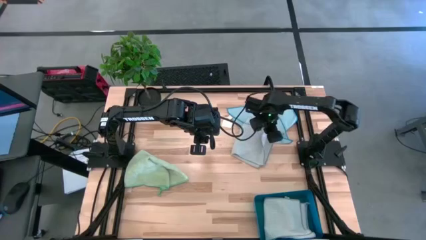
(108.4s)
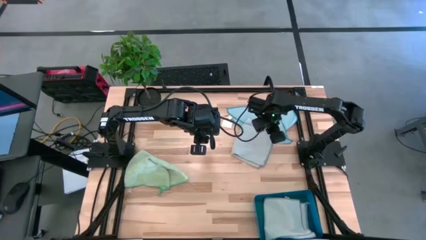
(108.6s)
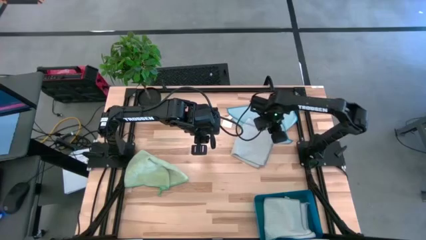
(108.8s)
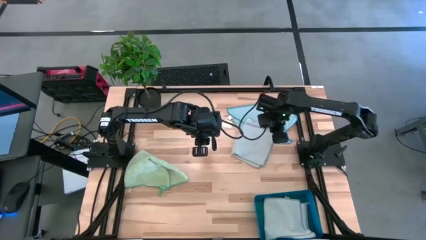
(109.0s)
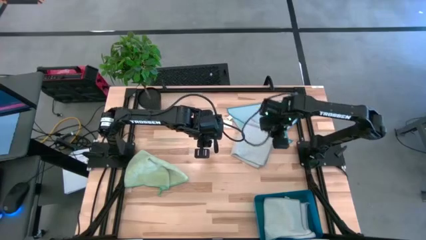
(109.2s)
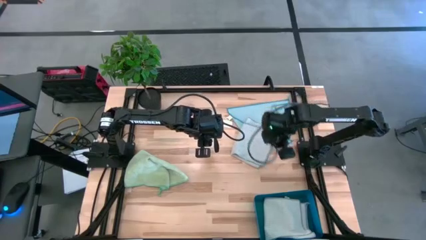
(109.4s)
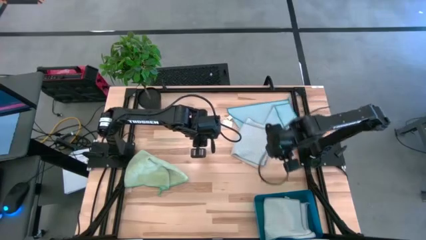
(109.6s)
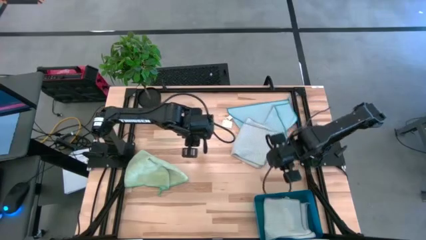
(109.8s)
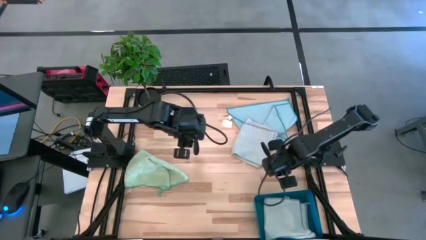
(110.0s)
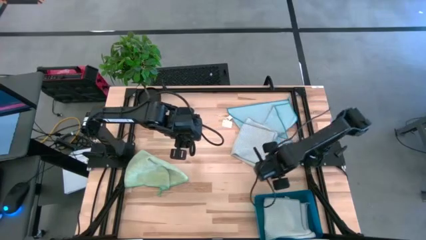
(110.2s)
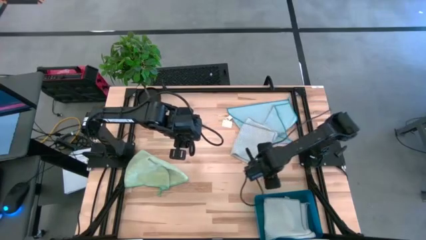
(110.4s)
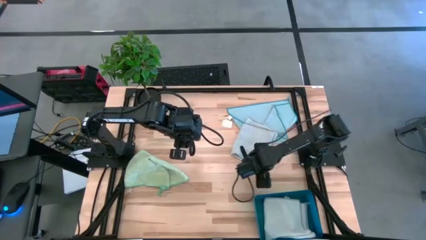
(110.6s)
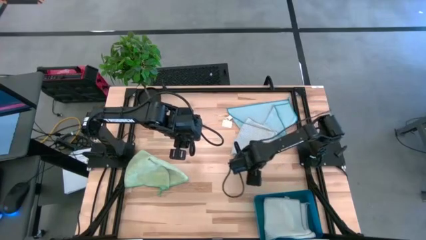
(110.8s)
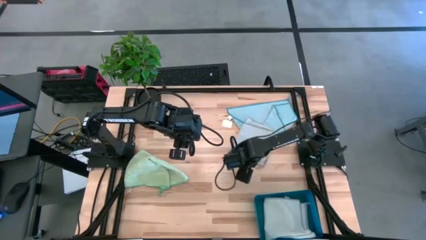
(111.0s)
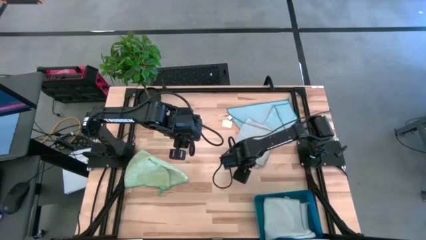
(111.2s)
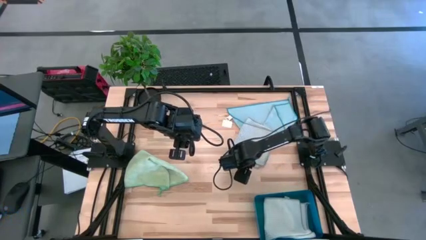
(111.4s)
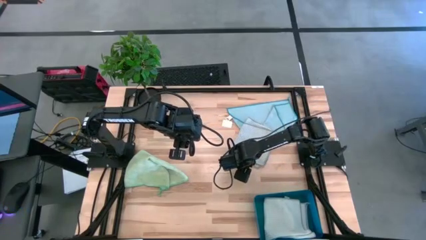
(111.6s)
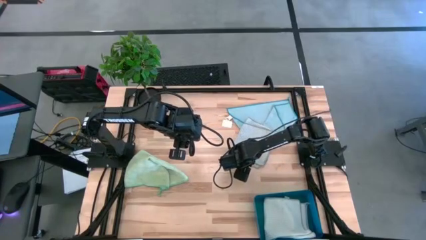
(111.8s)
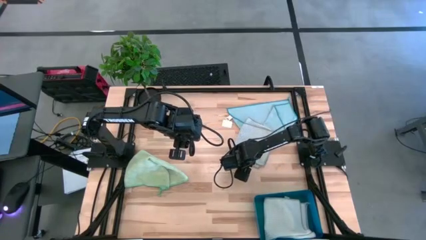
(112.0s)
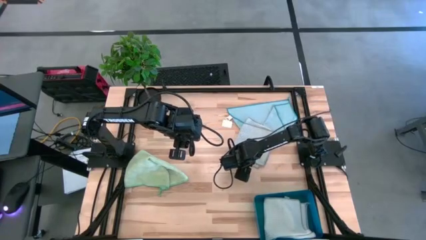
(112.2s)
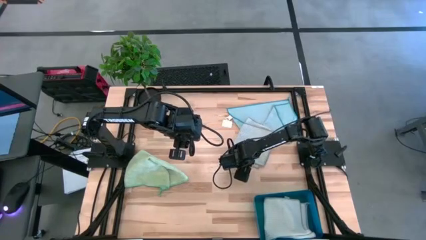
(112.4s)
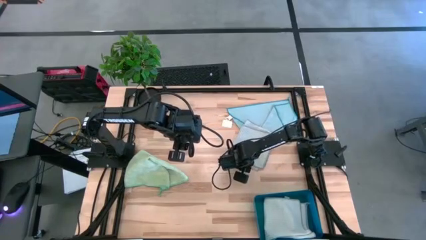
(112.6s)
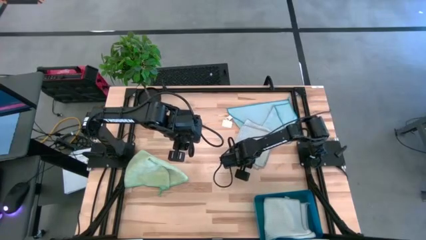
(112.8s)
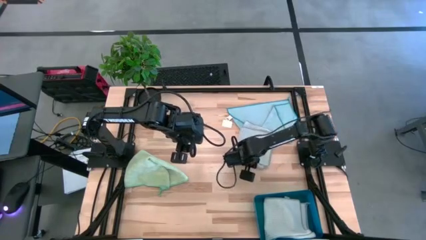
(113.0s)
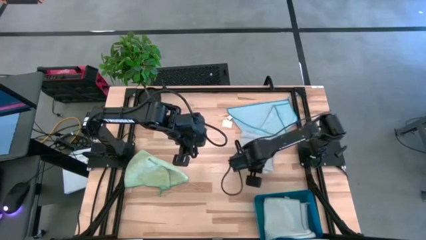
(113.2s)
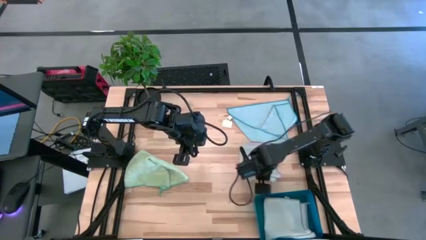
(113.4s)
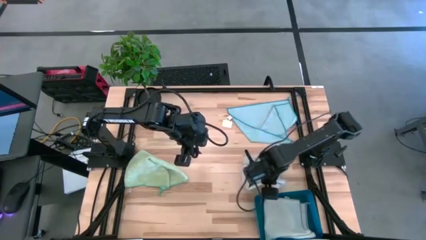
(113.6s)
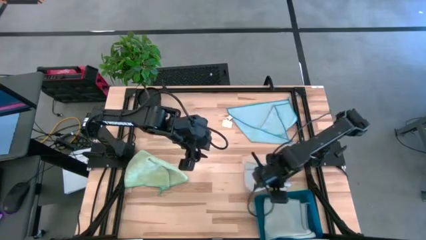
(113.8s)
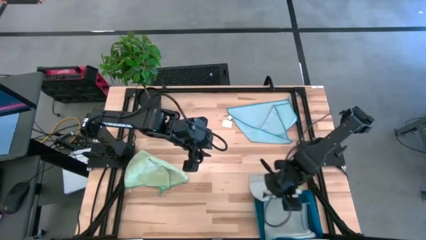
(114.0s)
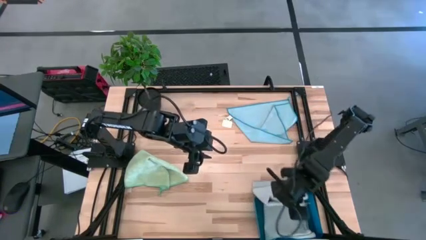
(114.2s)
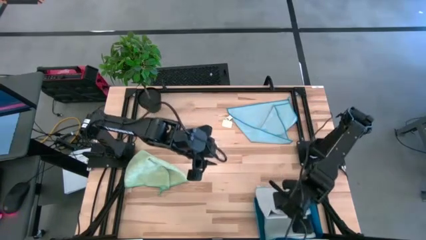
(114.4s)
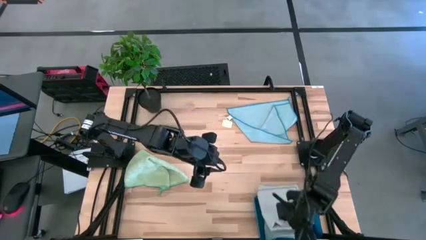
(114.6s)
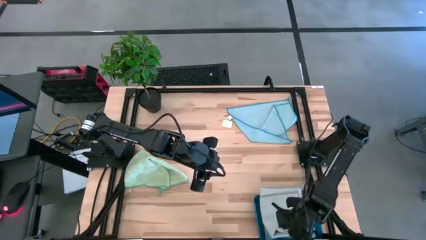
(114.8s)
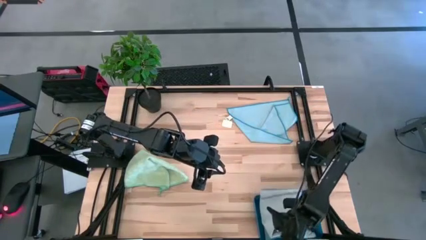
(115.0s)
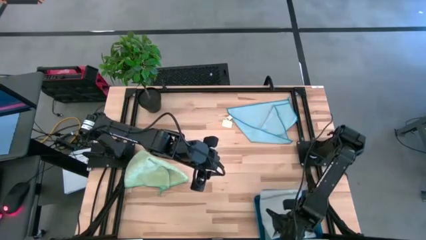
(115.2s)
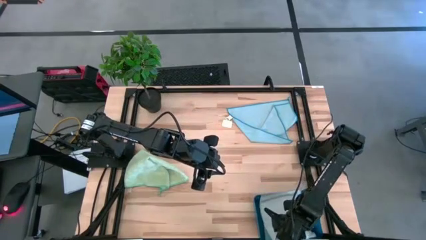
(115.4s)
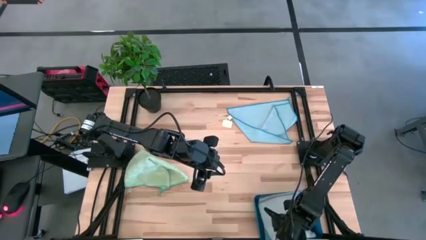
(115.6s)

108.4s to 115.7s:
Task: Fold microfiber towels
Put the gray microfiber cloth into the bin

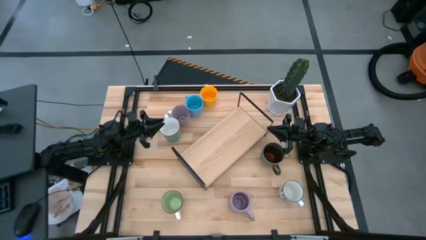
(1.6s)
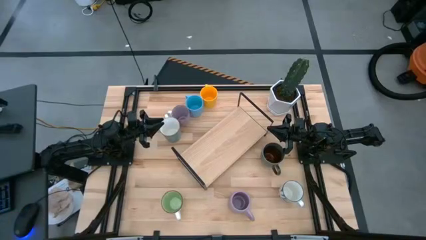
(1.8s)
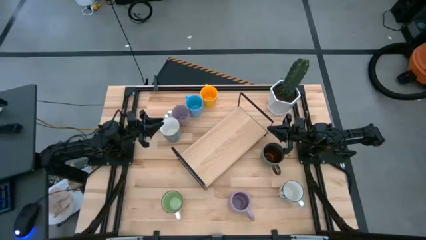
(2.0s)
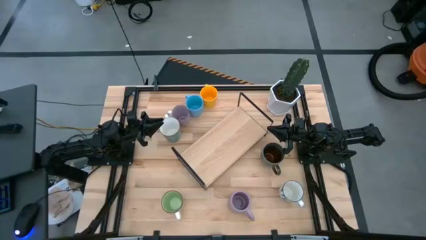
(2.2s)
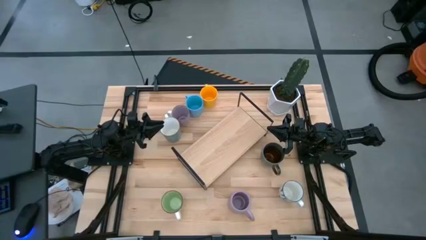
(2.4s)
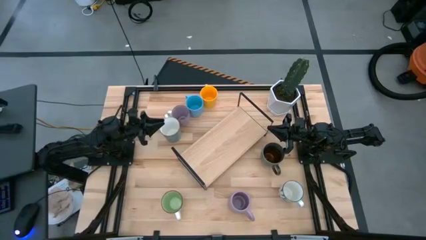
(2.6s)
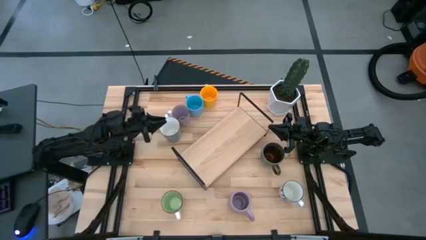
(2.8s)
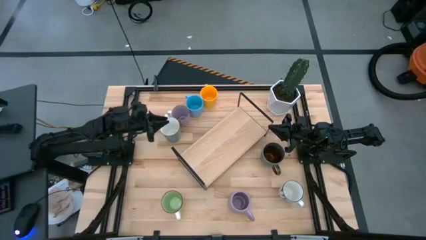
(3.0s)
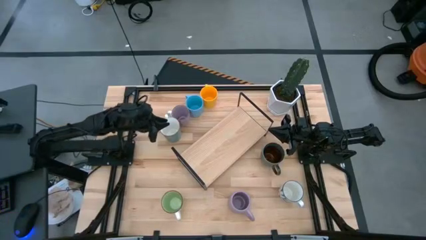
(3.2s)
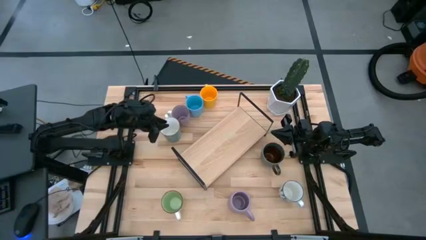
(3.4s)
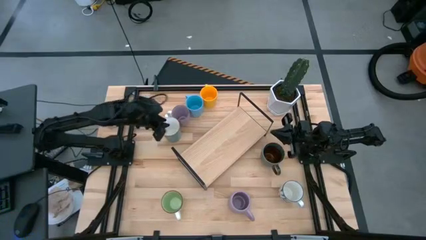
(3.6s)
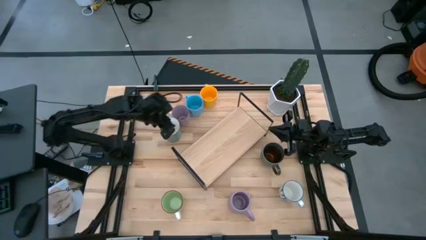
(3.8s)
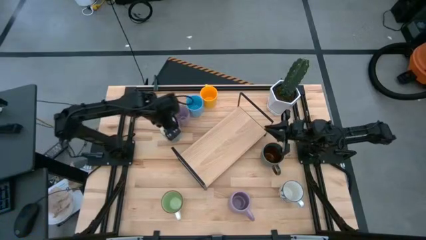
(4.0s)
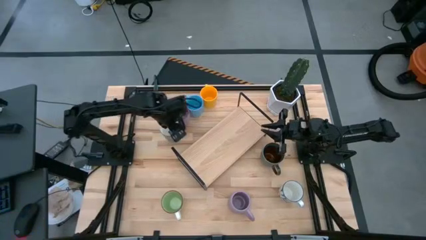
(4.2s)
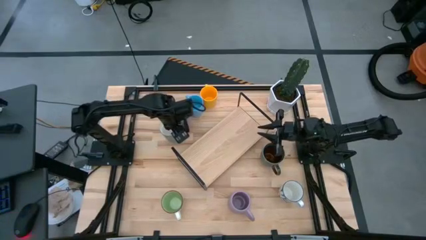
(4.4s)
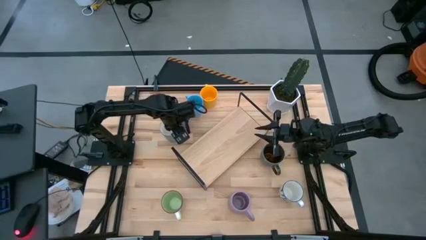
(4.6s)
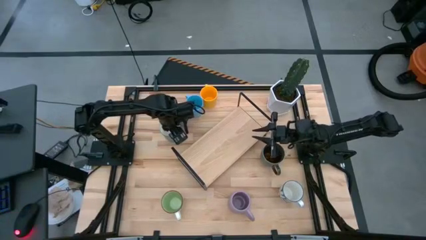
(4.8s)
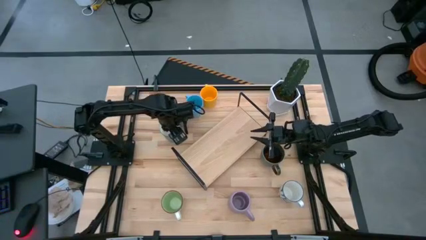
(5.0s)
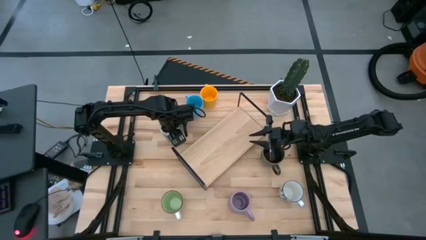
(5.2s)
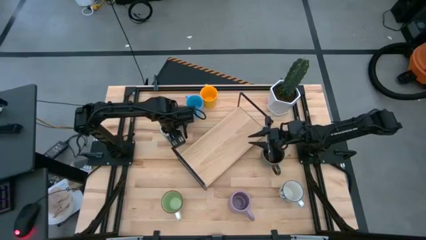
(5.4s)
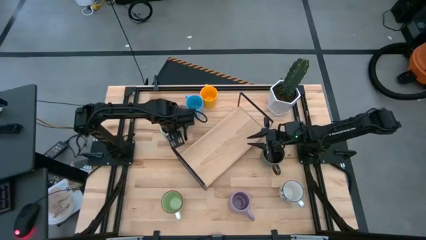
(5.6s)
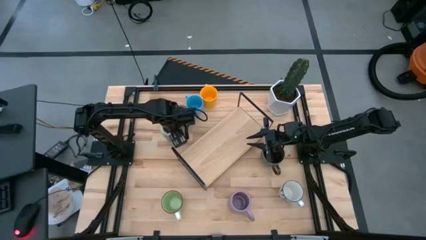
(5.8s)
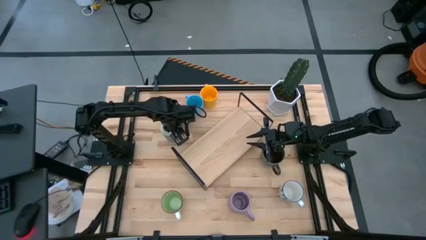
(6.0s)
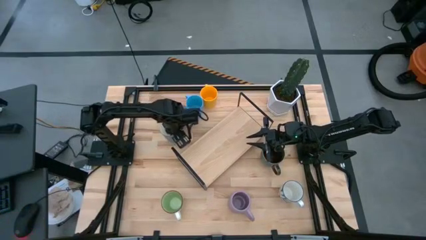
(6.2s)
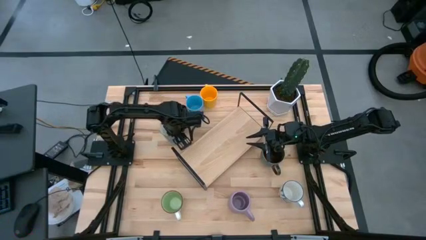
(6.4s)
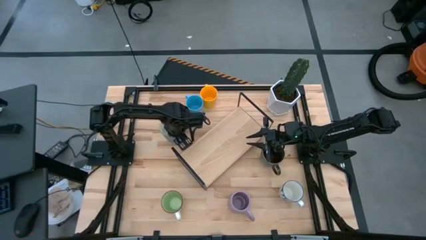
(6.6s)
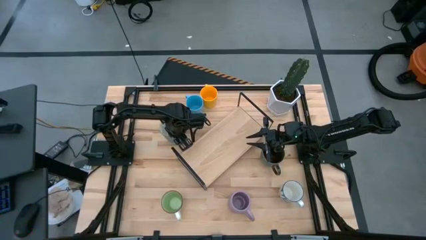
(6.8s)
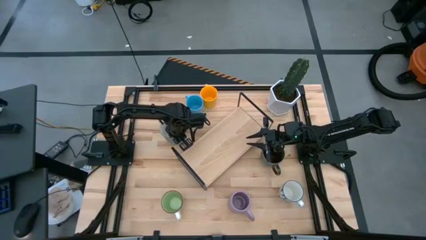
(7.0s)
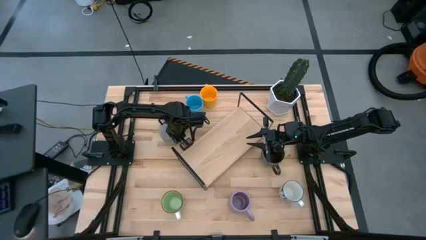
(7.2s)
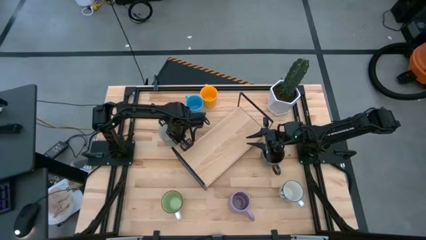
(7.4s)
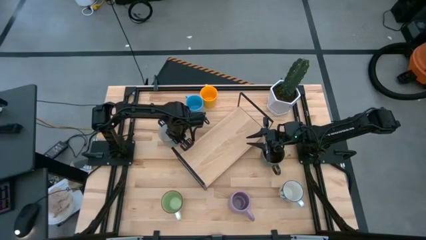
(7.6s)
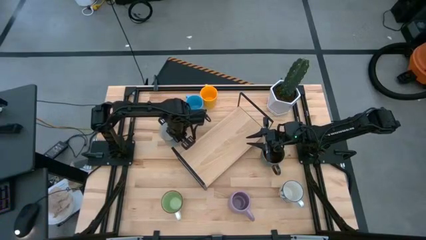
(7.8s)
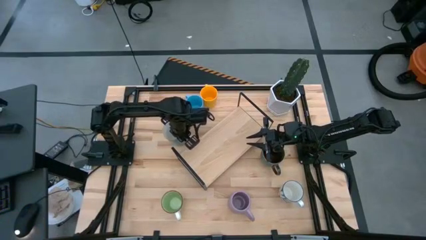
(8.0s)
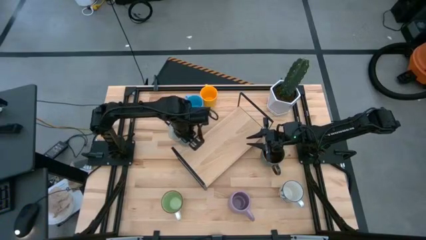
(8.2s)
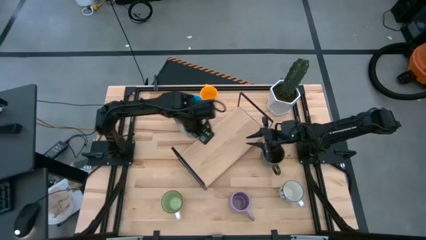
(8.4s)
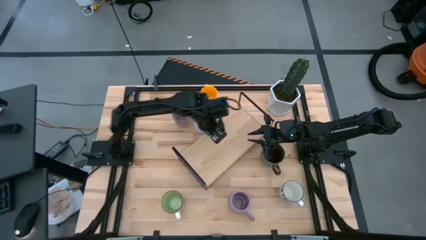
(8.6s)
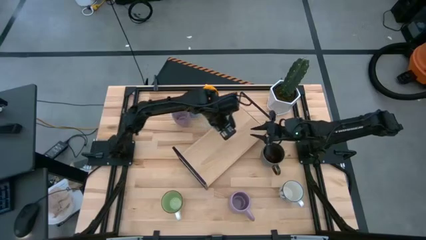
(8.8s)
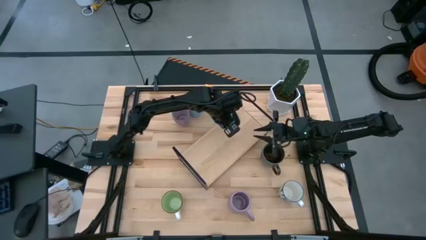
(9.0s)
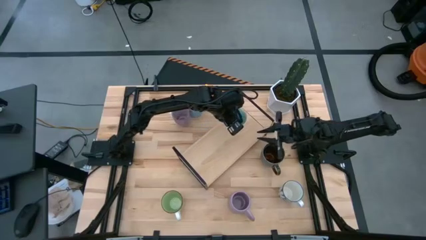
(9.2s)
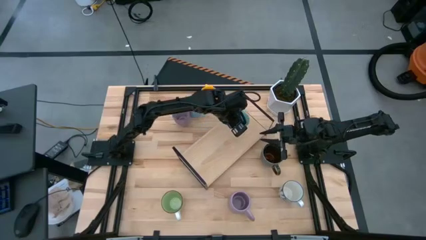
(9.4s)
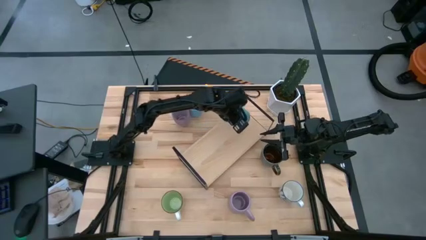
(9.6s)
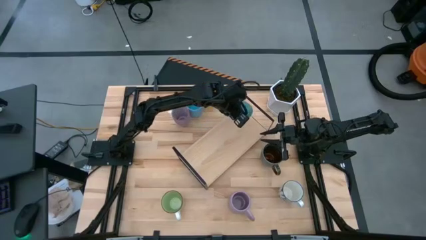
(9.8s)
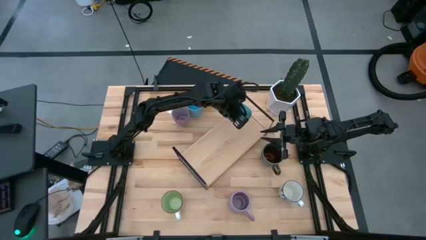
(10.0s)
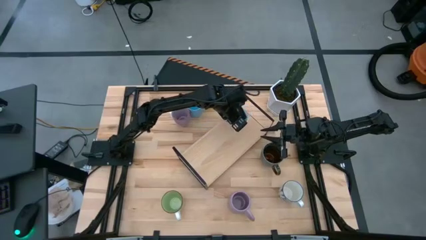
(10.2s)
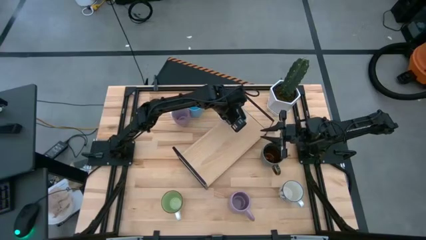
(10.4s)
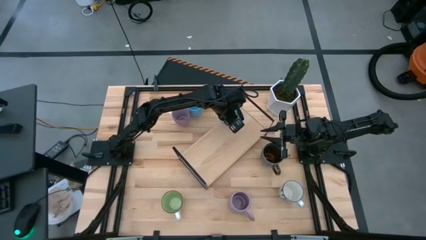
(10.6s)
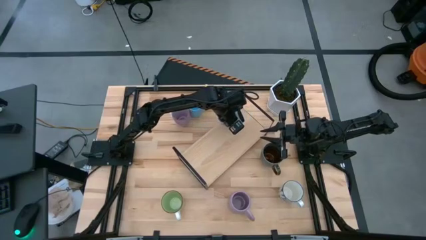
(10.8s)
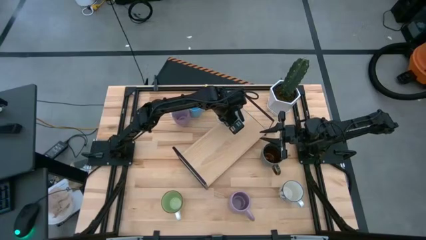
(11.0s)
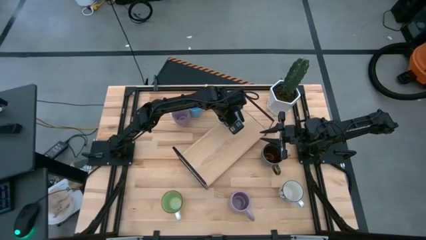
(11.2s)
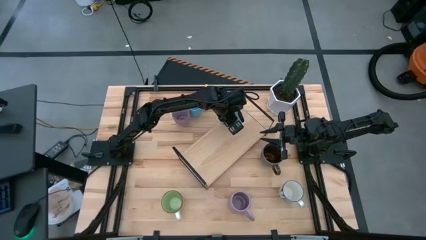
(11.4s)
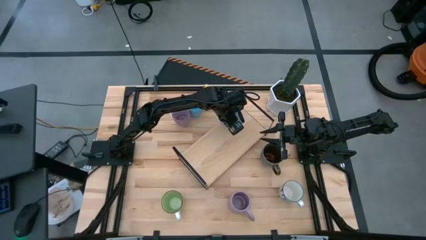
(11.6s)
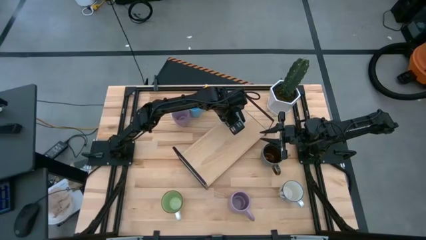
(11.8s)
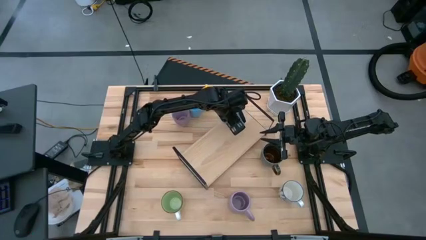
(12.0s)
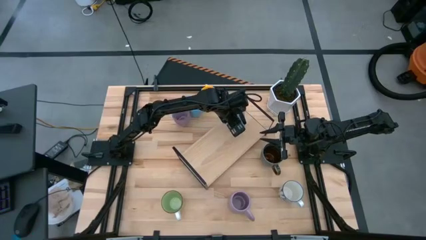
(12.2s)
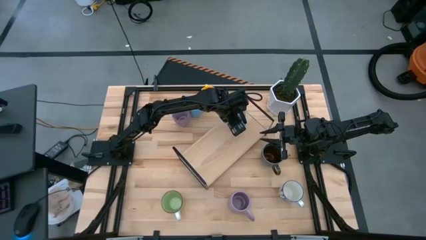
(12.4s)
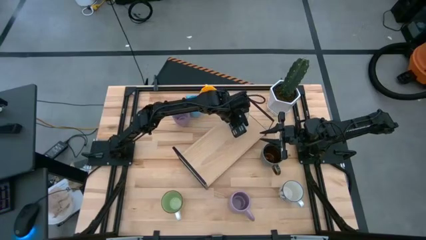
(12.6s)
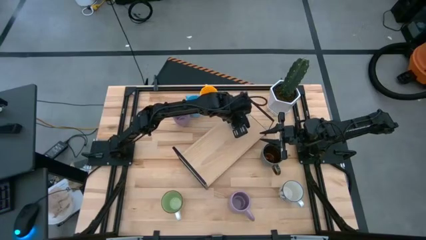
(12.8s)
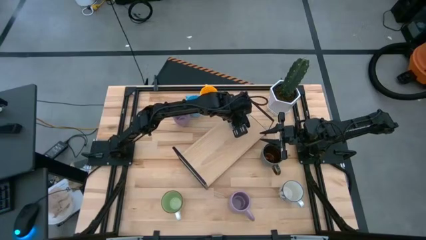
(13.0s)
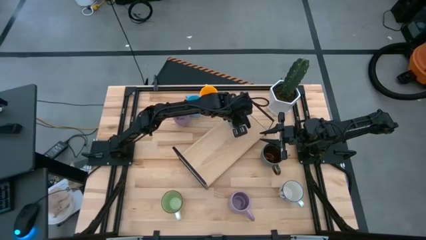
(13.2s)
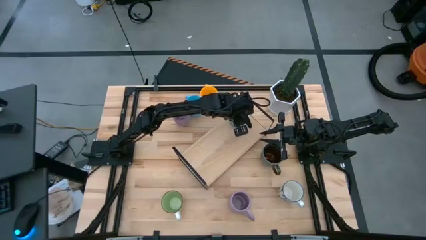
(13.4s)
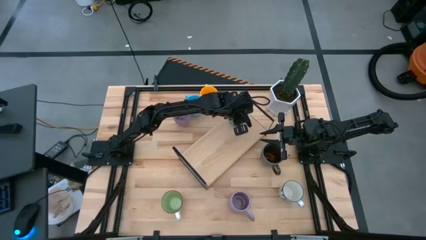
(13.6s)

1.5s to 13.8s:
Task: Place coffee mugs
Put the blue patterned mug on the shelf
